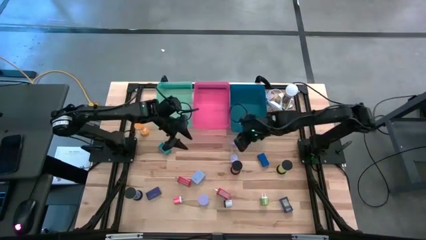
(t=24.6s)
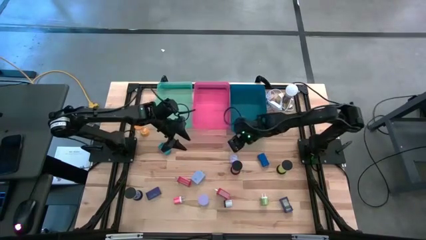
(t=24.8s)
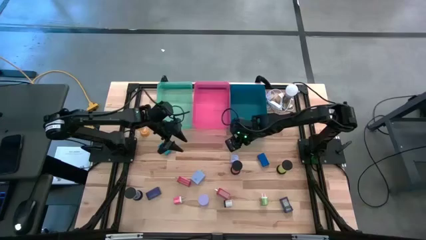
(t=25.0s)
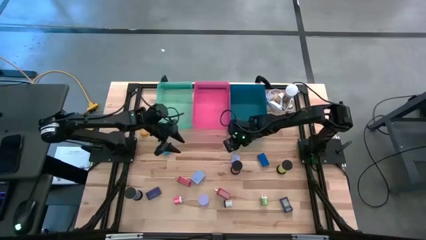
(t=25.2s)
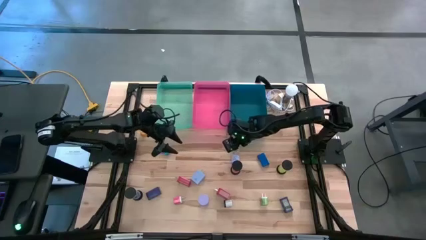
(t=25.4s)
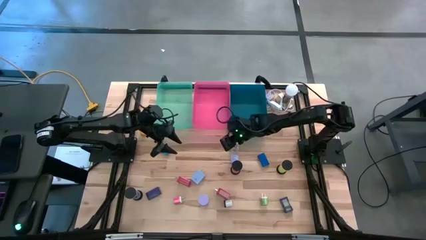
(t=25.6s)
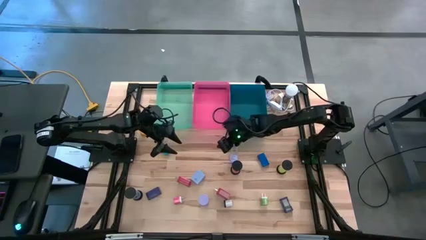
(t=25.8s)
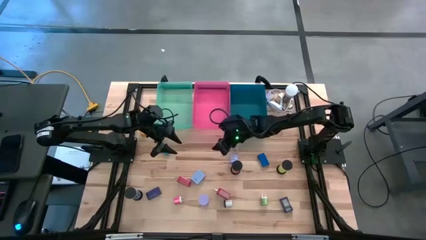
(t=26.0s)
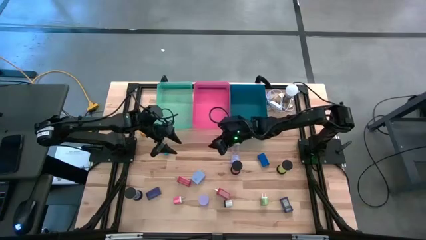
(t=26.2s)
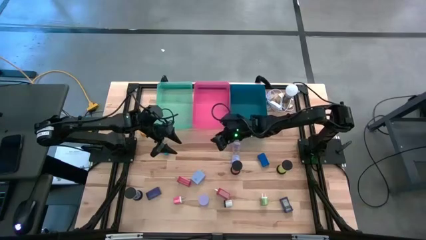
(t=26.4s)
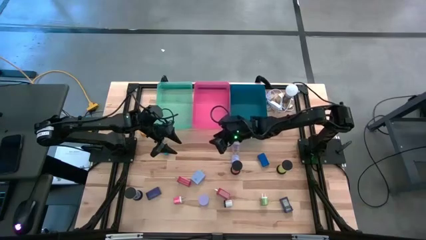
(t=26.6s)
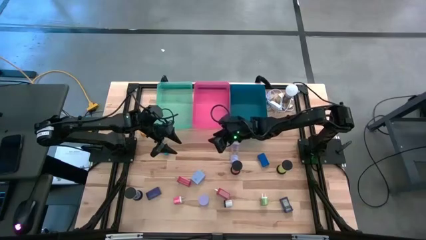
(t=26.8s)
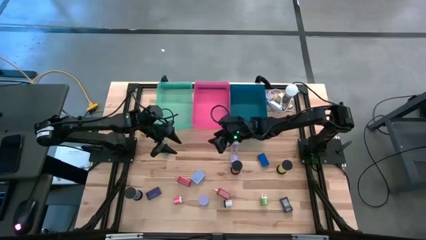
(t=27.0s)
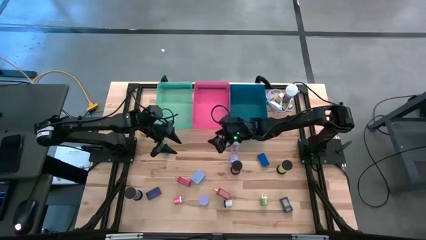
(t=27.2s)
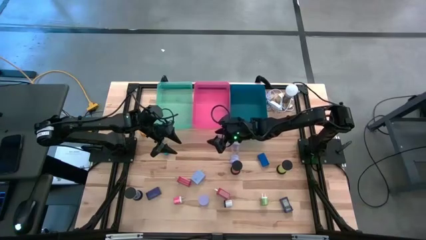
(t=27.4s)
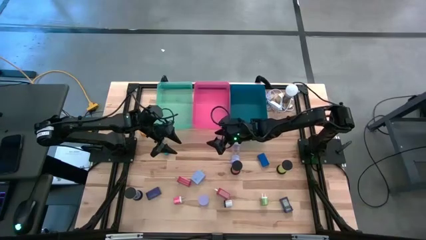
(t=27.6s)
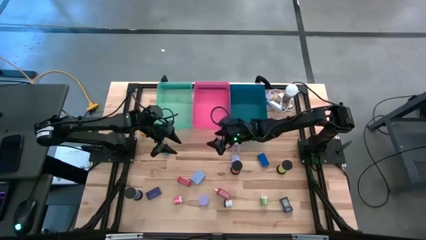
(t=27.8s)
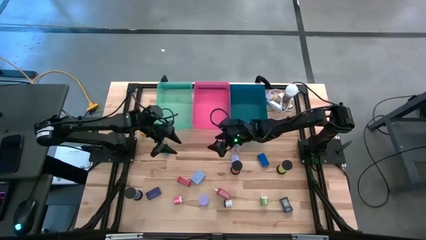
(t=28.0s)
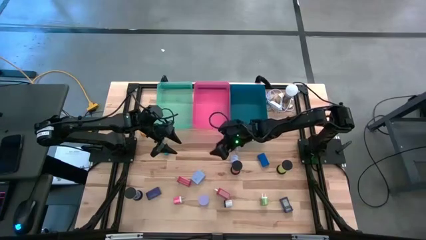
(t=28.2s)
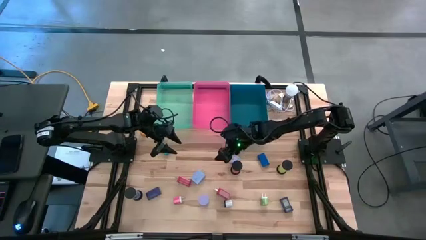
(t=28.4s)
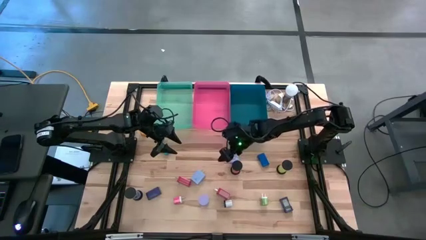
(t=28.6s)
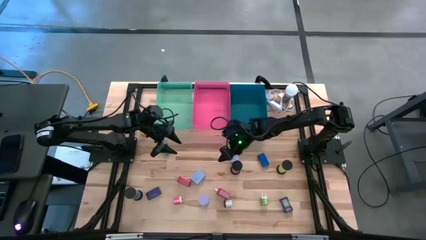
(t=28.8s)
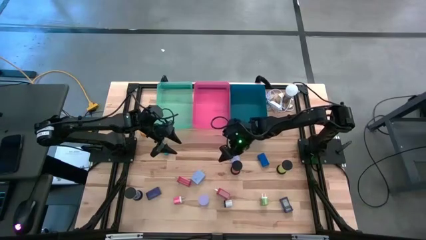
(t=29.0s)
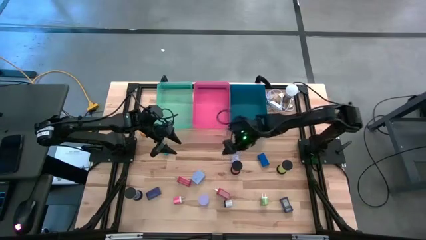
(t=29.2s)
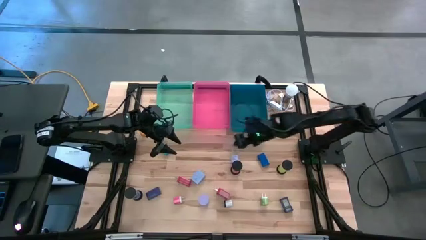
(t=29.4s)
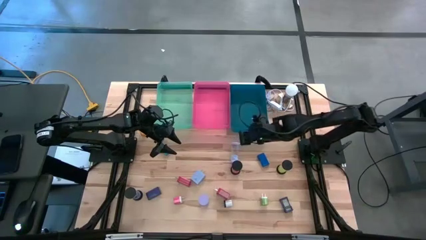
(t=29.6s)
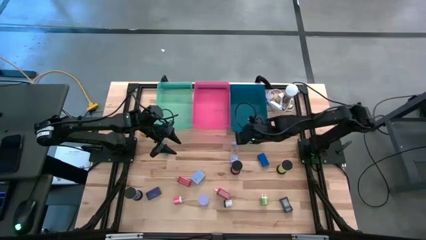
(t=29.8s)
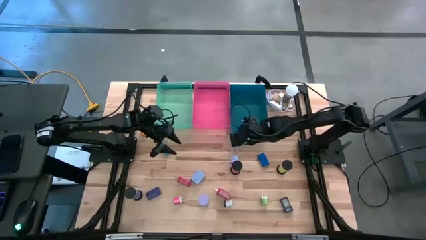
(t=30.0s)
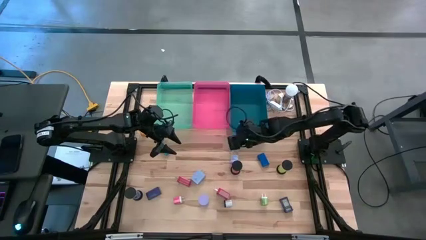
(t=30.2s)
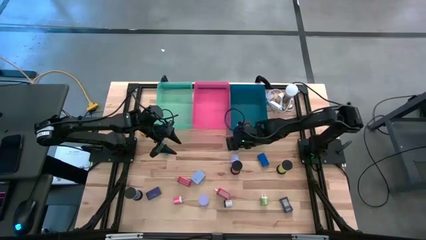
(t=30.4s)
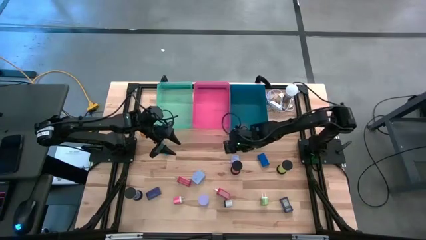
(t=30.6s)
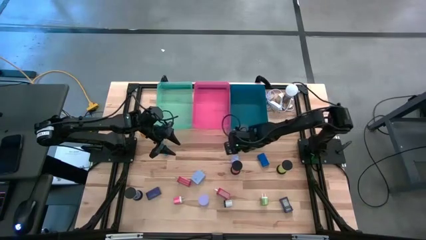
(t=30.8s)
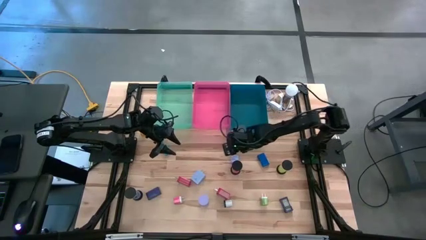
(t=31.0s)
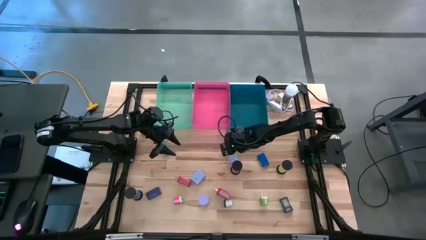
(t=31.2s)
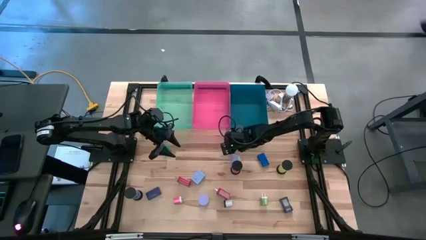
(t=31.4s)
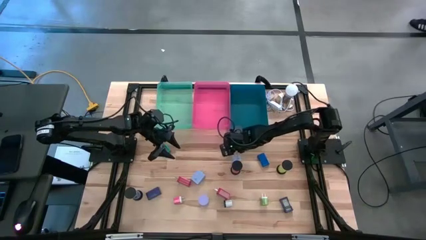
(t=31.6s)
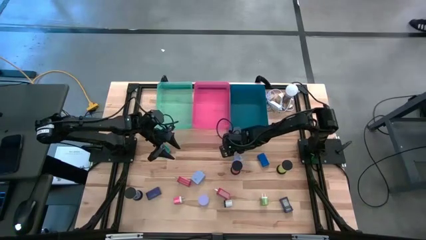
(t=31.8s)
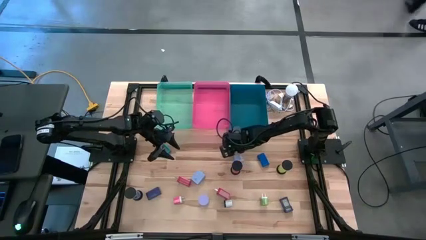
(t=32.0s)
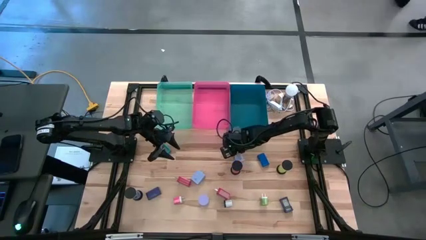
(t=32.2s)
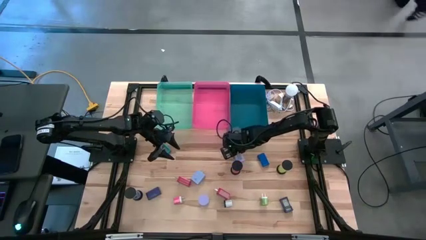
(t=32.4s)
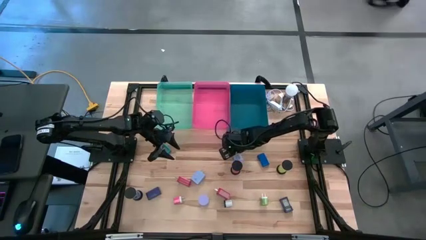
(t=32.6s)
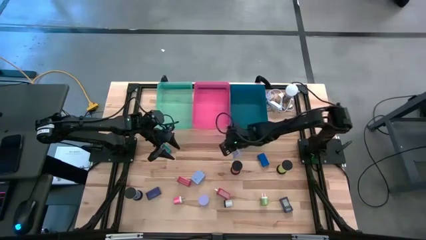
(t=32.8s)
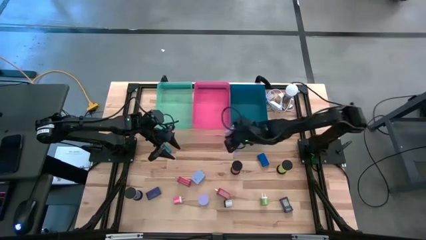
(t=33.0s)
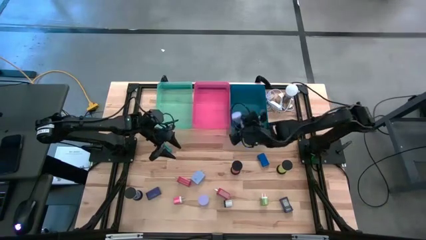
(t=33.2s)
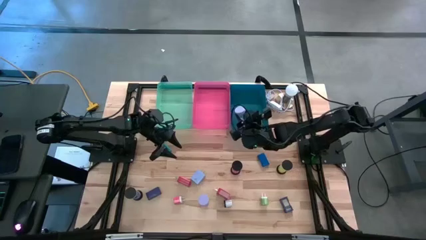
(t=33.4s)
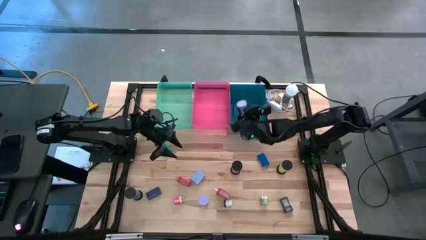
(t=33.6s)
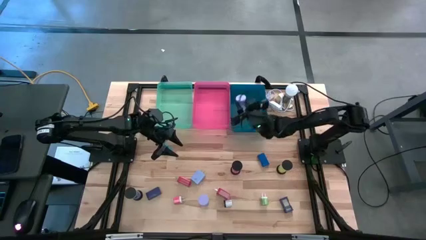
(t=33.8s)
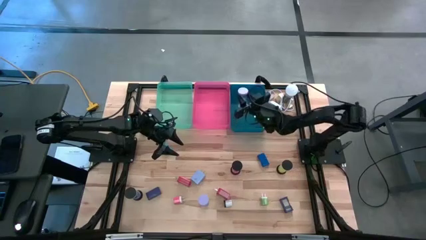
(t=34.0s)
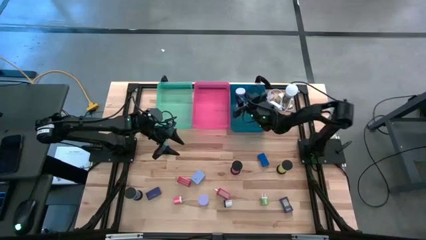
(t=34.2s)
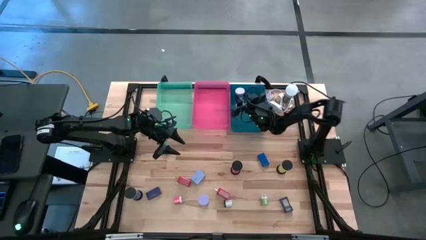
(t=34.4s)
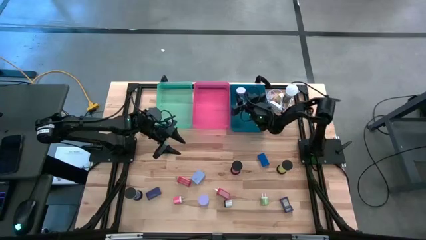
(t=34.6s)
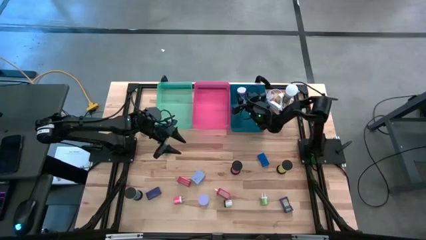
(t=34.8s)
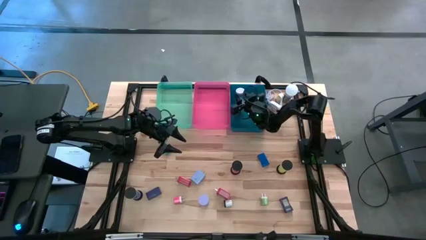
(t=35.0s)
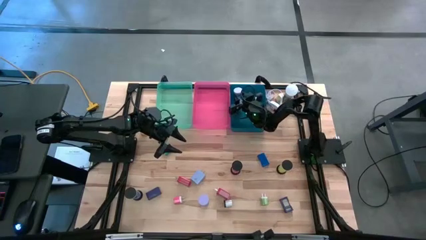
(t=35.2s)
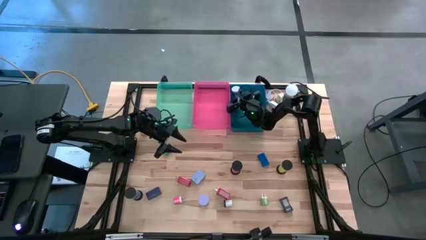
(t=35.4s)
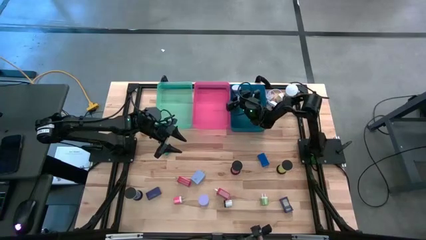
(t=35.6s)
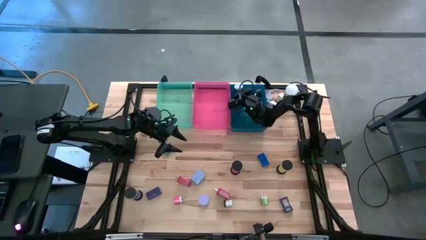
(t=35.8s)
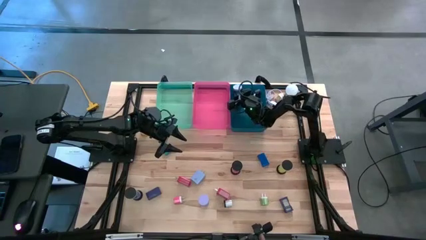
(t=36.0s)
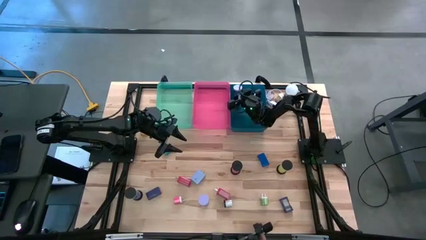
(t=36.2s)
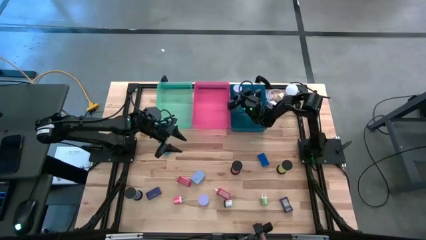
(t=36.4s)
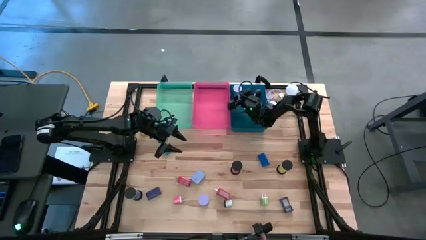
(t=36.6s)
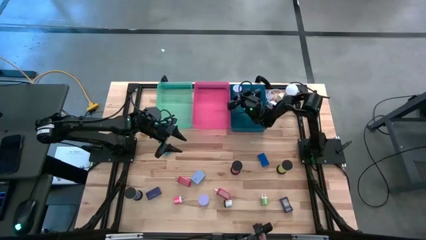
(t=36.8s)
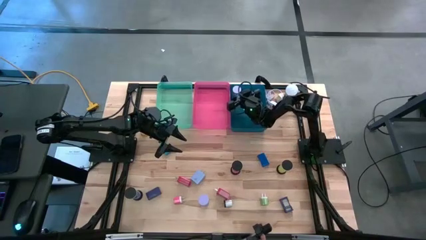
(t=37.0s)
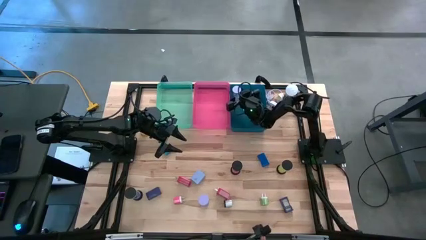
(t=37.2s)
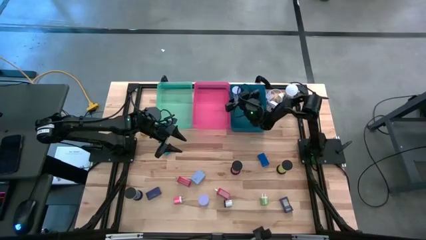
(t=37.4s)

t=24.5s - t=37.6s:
Task: Pick & Place Office items
Put the light purple hourglass into the dark blue bin

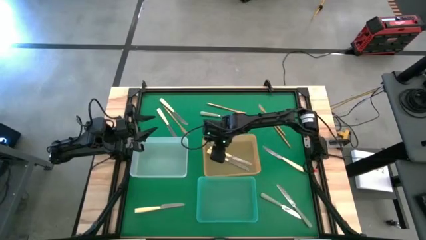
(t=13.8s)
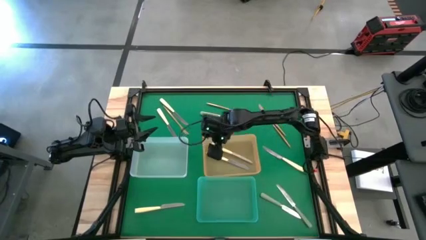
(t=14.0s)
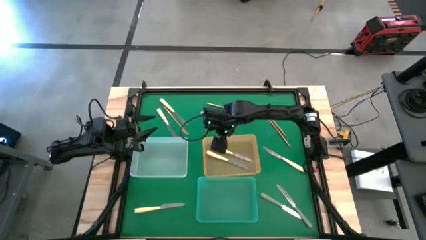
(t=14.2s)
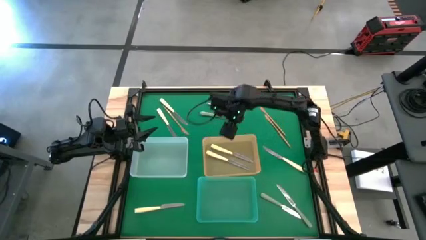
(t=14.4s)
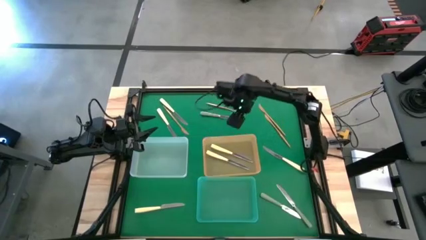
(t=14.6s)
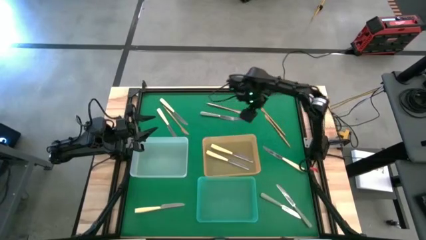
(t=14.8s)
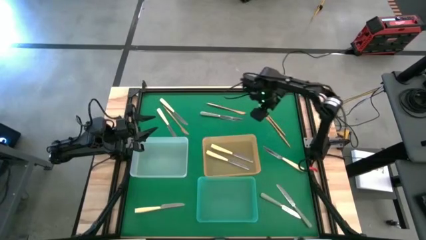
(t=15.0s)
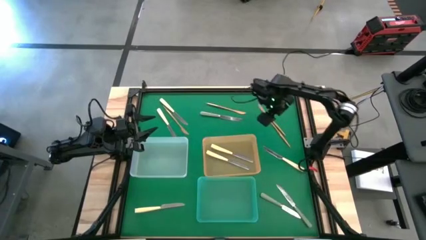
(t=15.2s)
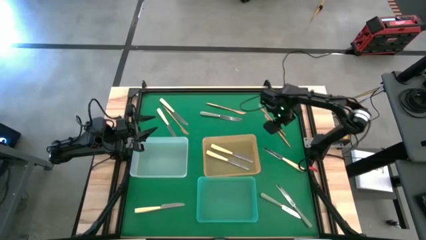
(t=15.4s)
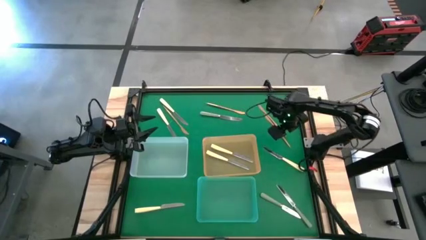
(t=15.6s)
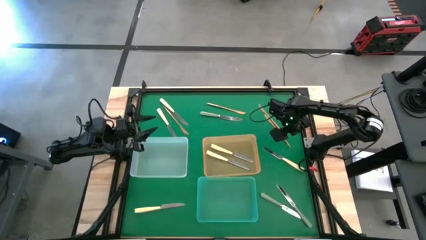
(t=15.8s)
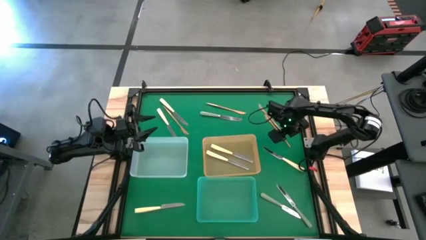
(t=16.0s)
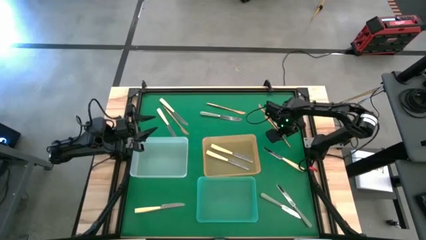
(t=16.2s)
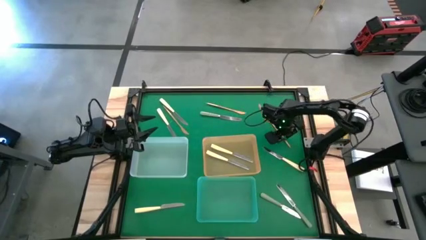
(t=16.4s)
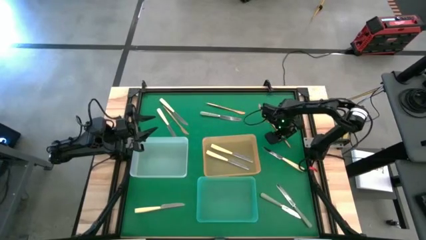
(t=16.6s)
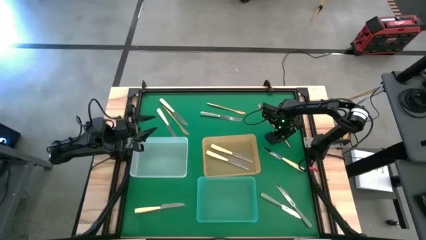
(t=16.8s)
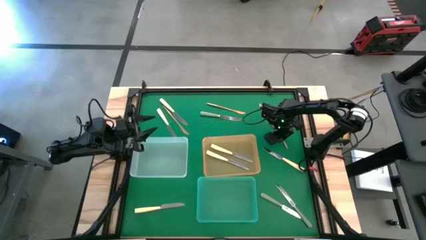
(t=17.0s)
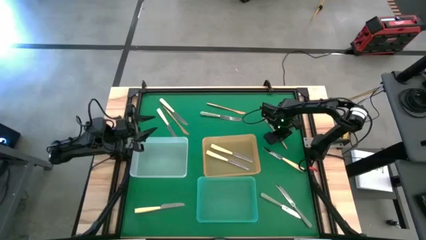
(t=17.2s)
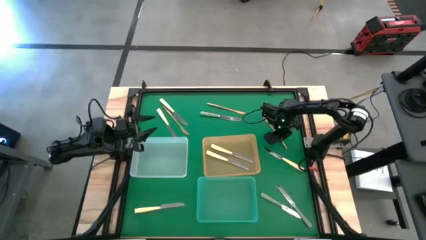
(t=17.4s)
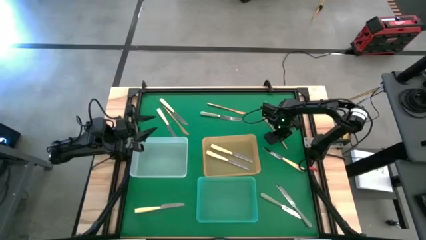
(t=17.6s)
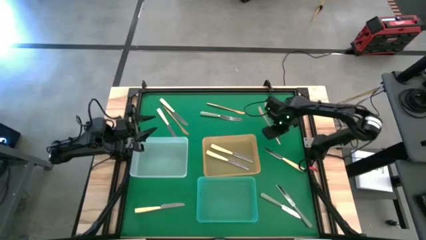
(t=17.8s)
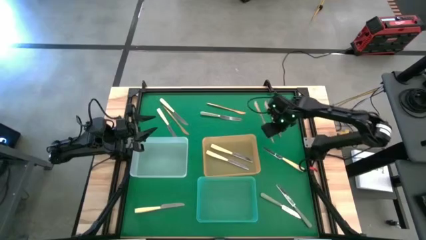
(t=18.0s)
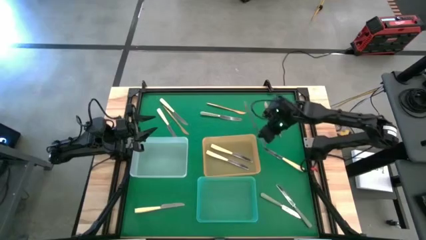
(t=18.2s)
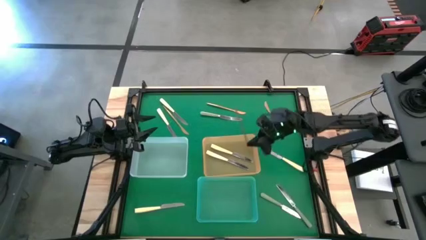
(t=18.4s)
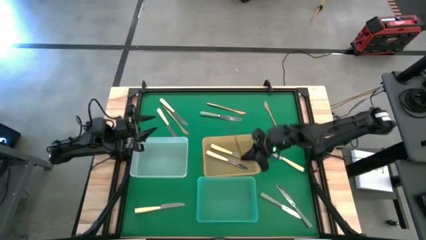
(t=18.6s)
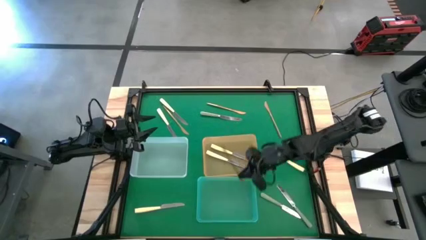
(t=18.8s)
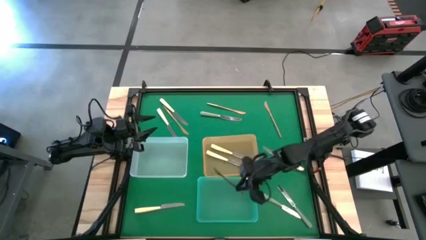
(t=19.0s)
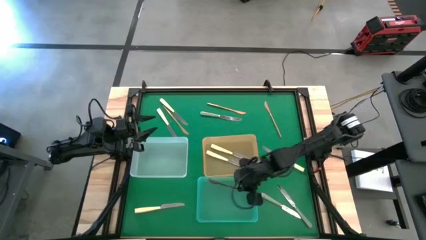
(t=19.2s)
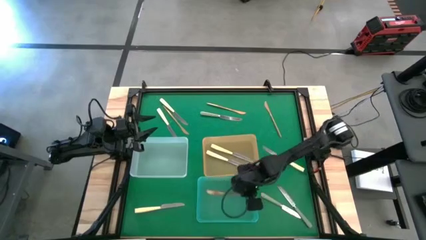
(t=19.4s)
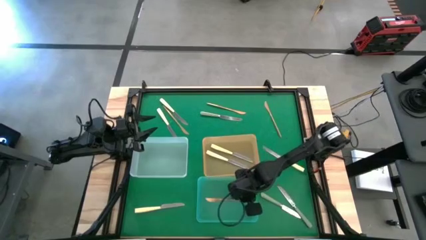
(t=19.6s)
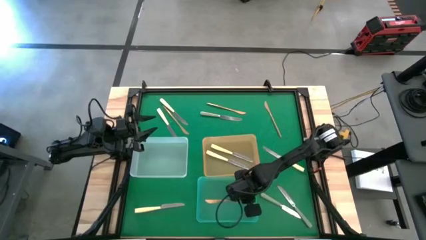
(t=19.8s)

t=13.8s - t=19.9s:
Task: Sort silverware by color (type)
Put the gold table knife into the blue bin
